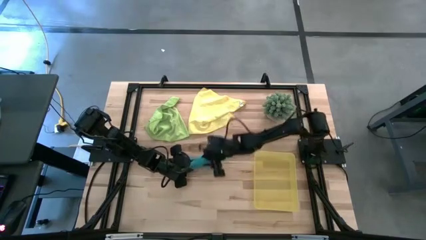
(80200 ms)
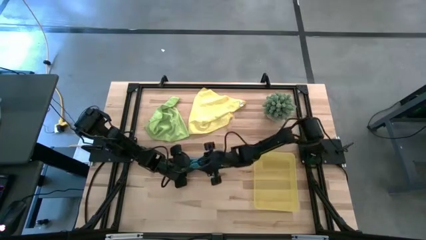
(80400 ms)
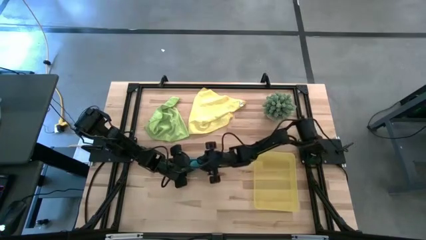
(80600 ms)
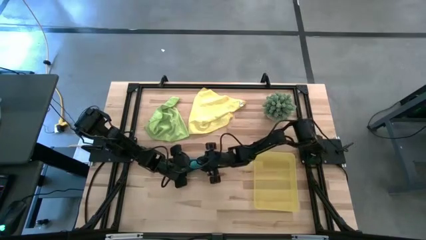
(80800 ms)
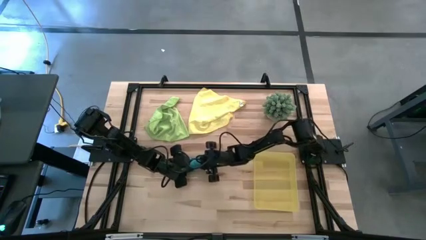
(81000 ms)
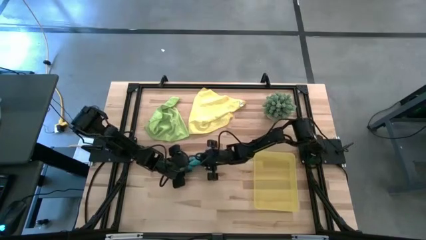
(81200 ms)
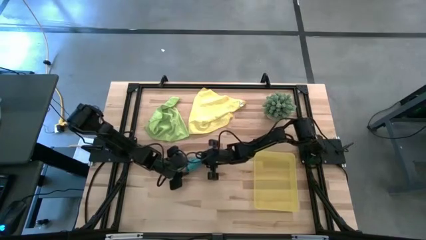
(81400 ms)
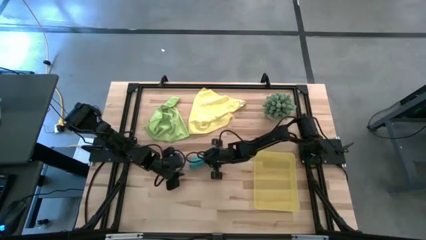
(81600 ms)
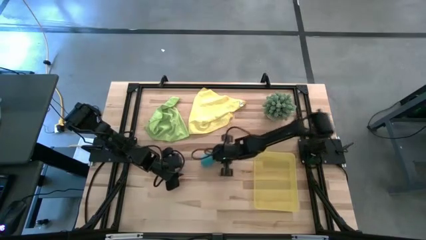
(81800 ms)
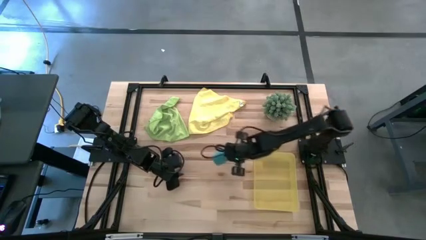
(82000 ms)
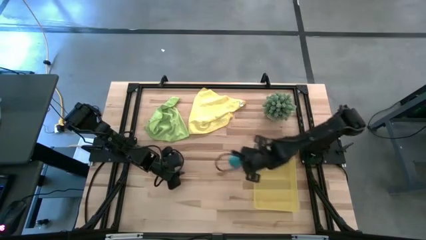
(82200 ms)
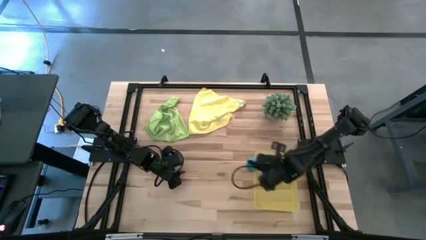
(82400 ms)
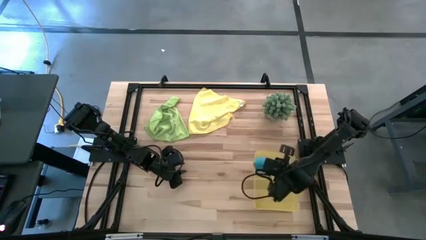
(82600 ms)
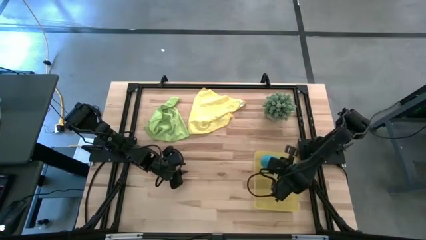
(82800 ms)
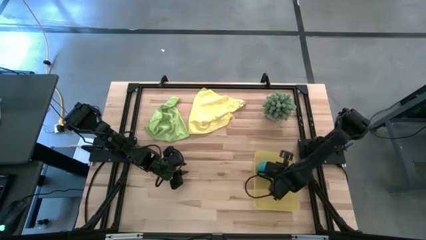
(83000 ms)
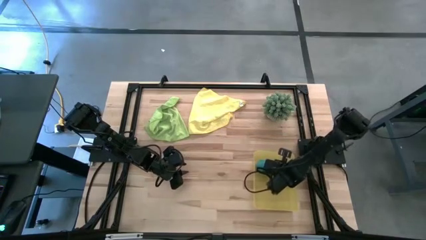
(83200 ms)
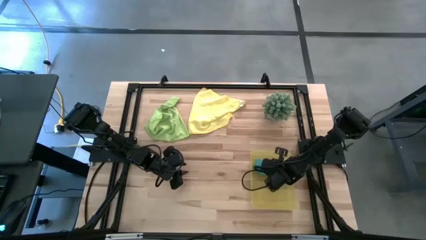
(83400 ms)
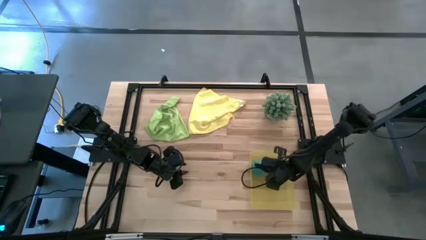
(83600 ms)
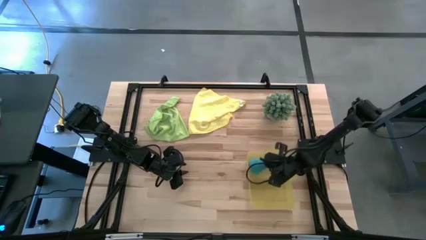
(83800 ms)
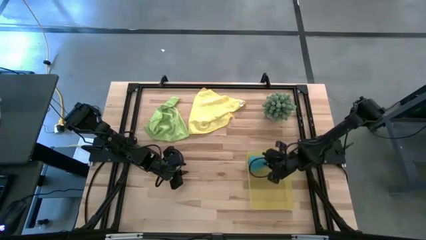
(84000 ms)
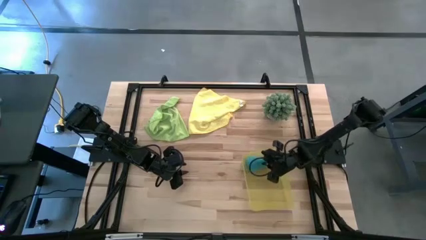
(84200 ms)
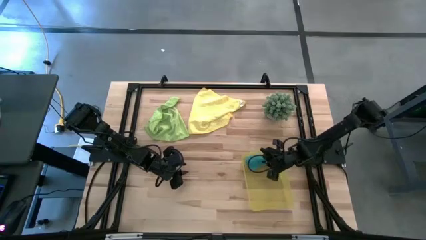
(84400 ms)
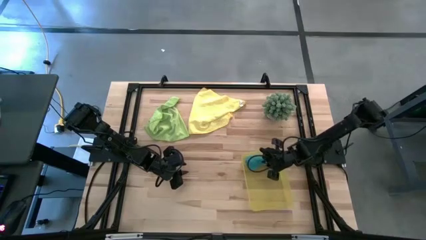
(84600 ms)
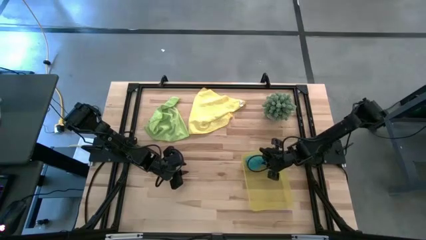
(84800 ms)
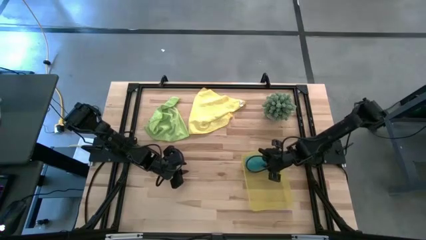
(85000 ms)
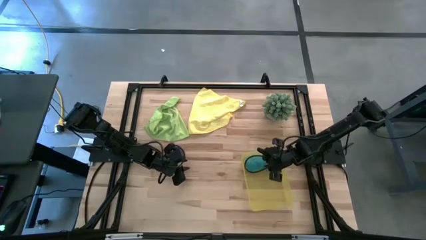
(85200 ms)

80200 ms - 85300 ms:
Task: Roll microfiber towels into tight, uniform cylinder then place into a basket
Put the blue microfiber cloth into the yellow bin

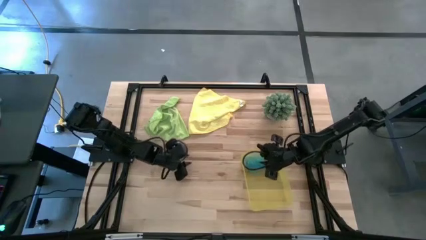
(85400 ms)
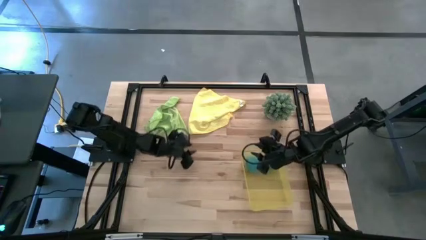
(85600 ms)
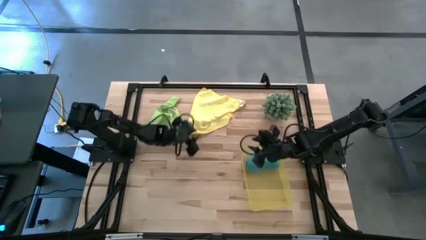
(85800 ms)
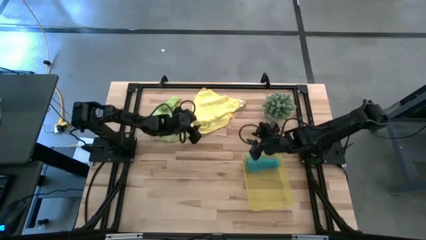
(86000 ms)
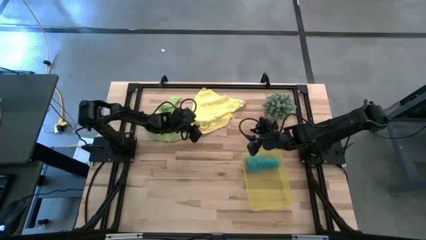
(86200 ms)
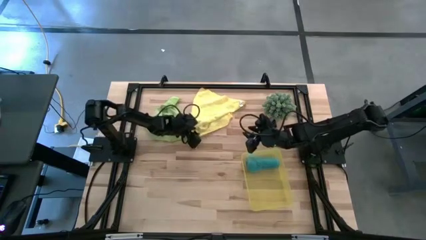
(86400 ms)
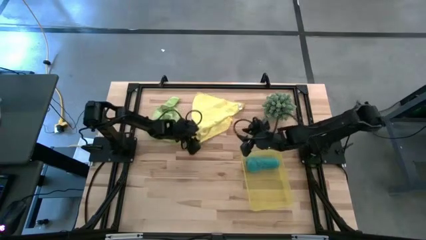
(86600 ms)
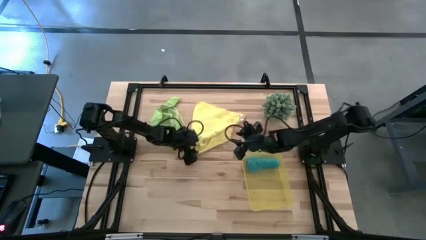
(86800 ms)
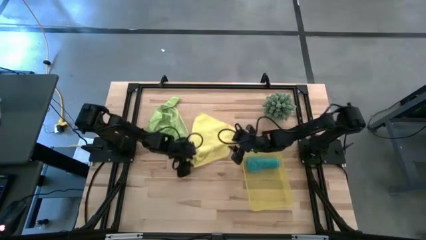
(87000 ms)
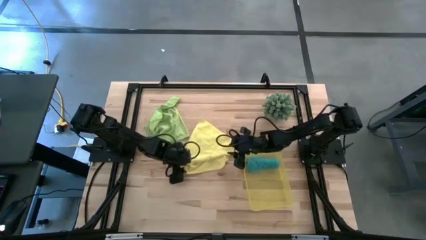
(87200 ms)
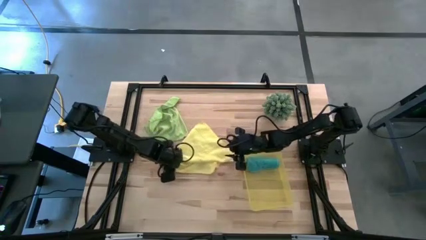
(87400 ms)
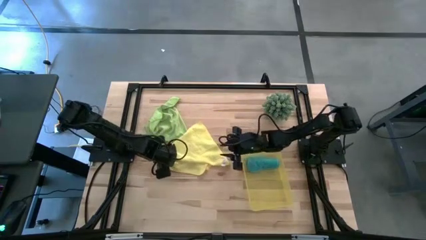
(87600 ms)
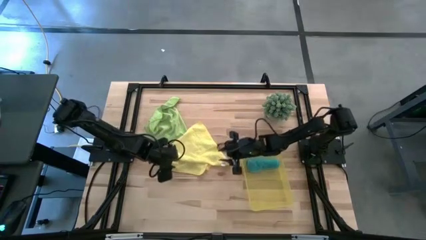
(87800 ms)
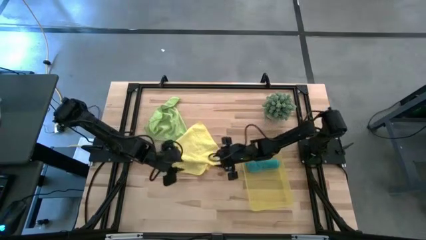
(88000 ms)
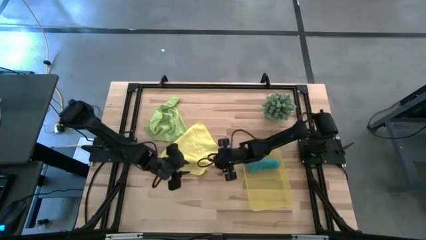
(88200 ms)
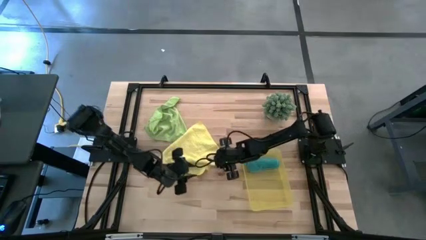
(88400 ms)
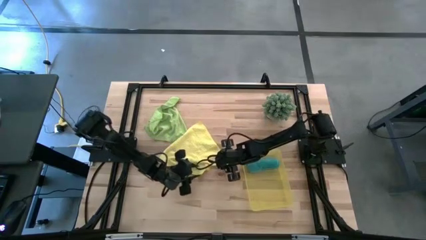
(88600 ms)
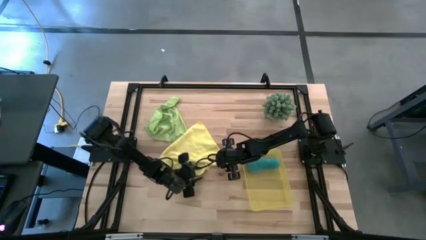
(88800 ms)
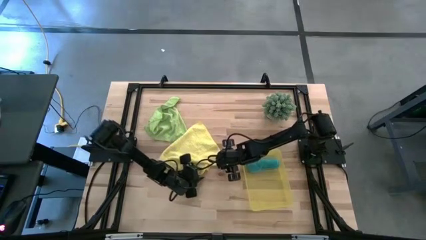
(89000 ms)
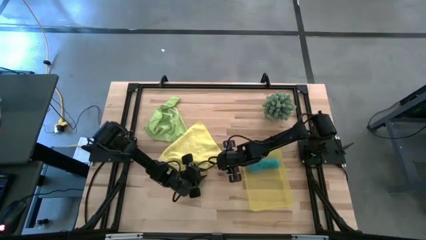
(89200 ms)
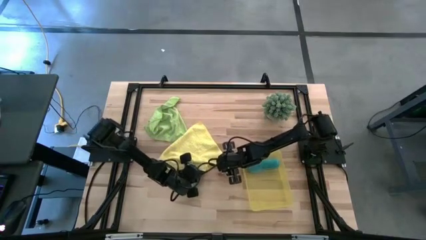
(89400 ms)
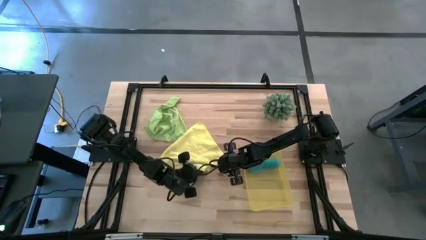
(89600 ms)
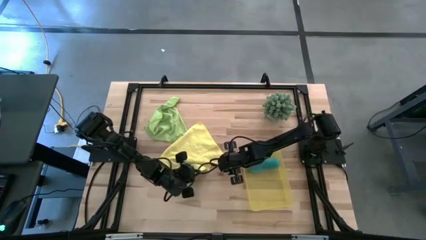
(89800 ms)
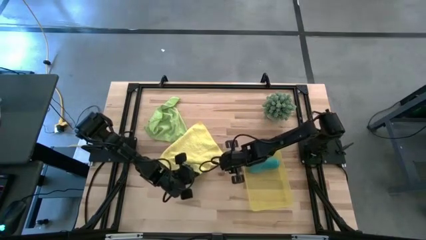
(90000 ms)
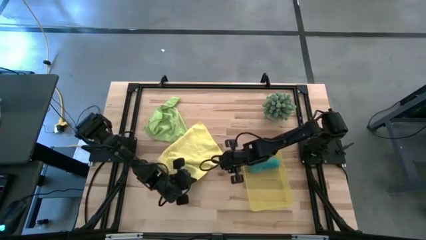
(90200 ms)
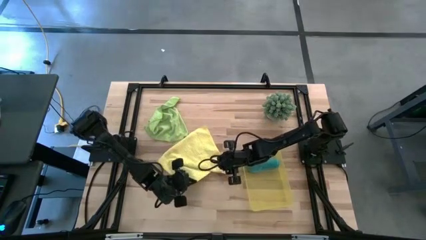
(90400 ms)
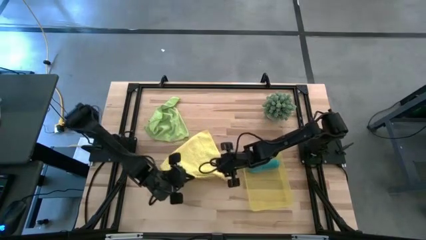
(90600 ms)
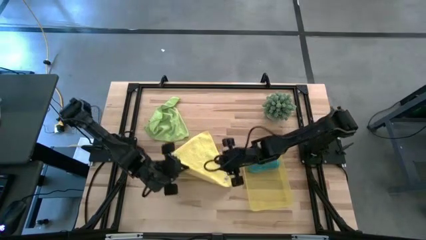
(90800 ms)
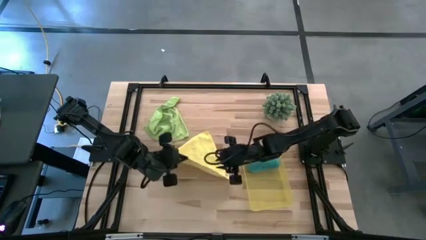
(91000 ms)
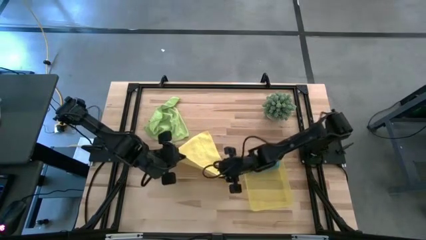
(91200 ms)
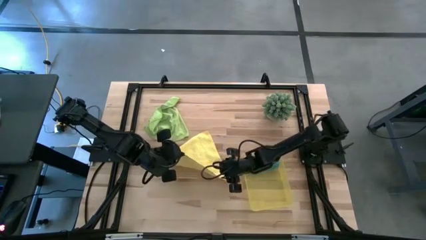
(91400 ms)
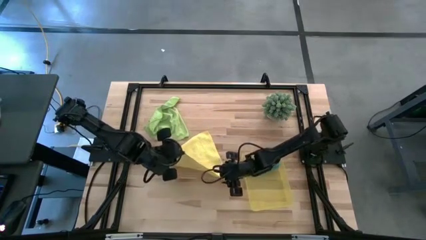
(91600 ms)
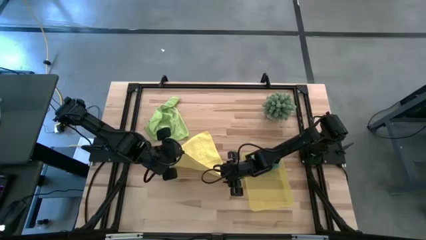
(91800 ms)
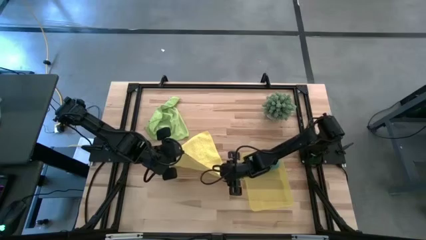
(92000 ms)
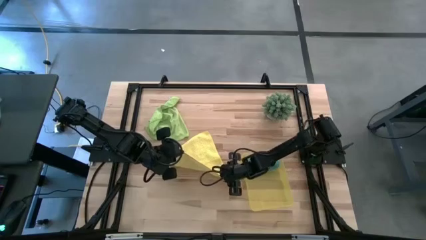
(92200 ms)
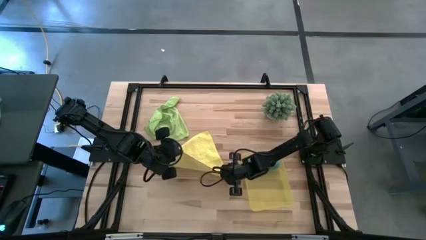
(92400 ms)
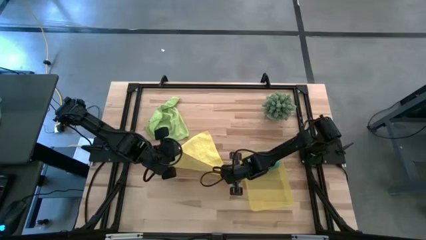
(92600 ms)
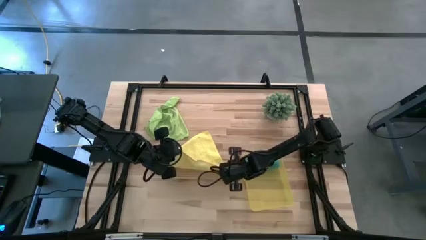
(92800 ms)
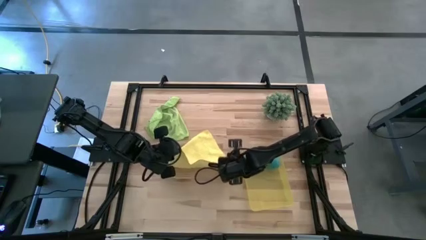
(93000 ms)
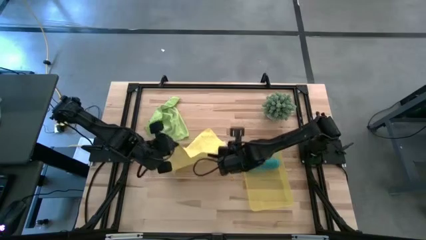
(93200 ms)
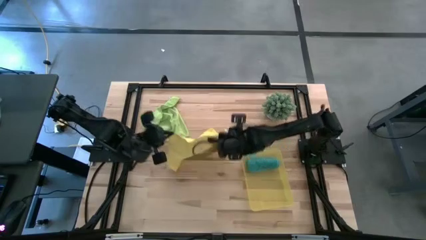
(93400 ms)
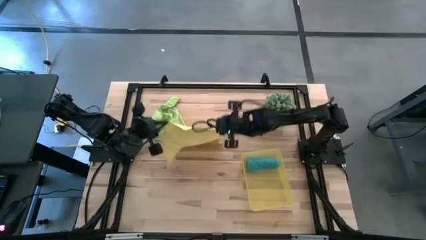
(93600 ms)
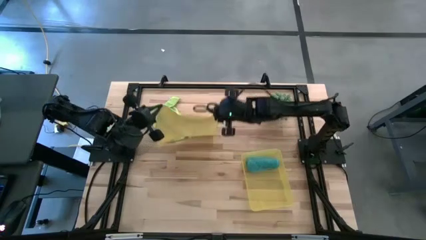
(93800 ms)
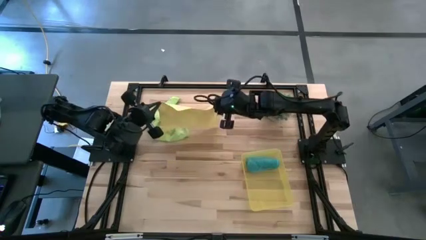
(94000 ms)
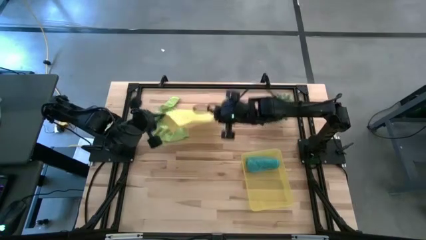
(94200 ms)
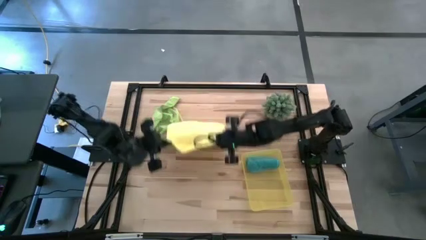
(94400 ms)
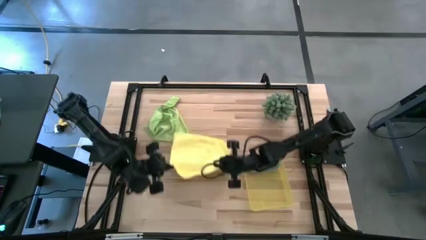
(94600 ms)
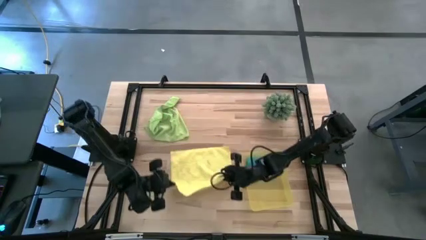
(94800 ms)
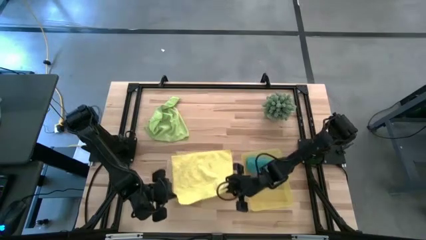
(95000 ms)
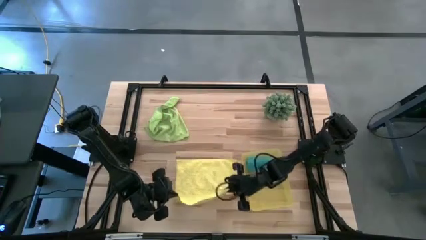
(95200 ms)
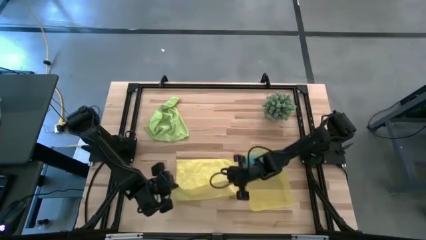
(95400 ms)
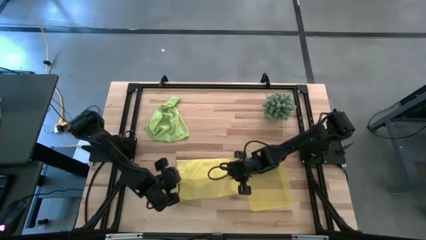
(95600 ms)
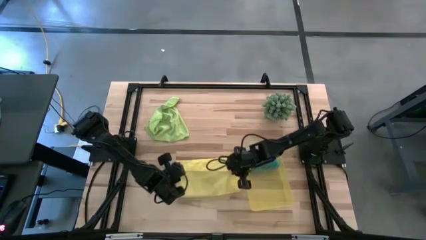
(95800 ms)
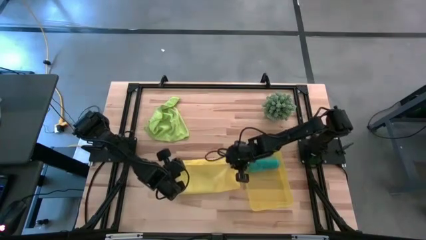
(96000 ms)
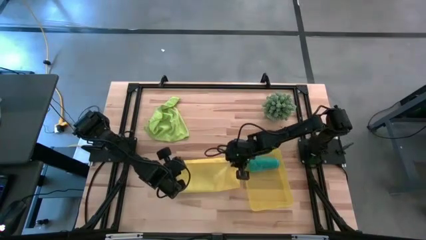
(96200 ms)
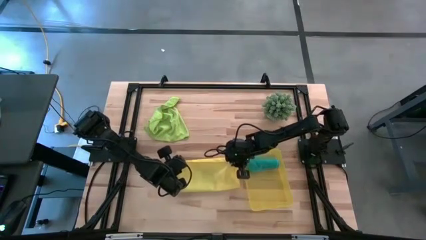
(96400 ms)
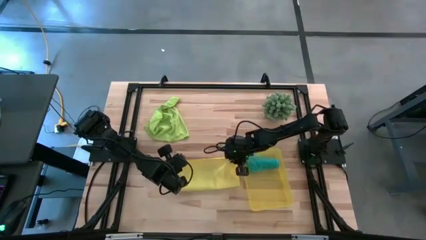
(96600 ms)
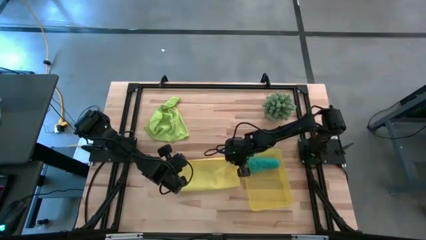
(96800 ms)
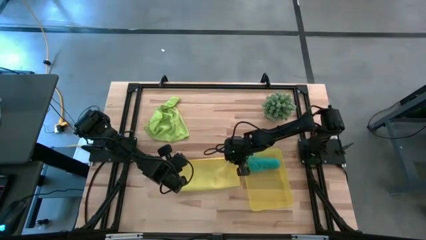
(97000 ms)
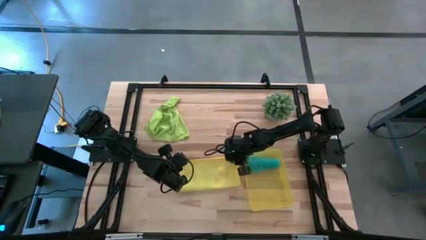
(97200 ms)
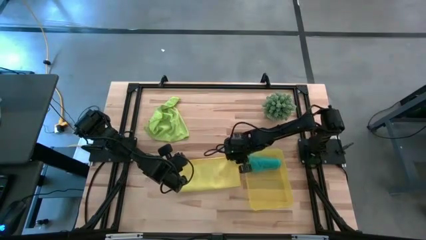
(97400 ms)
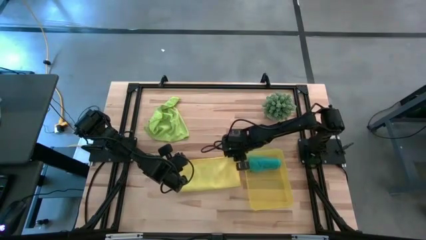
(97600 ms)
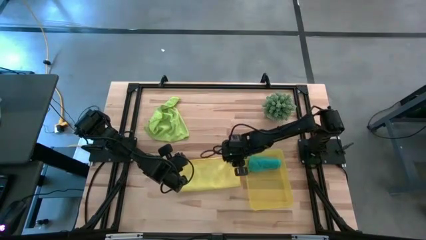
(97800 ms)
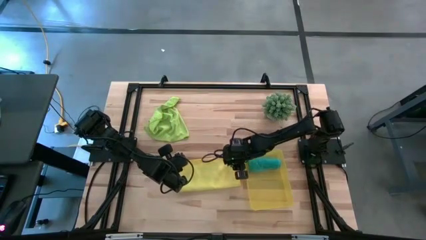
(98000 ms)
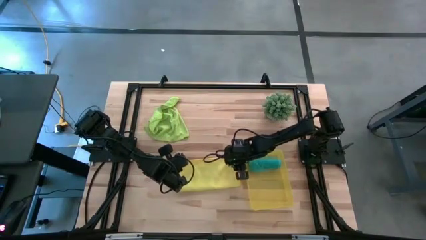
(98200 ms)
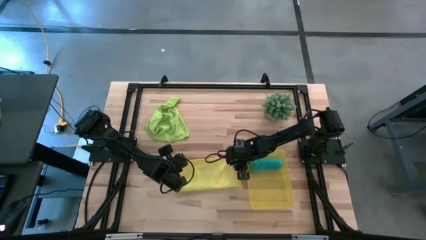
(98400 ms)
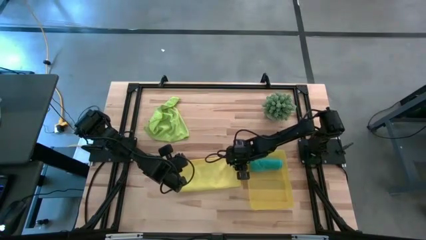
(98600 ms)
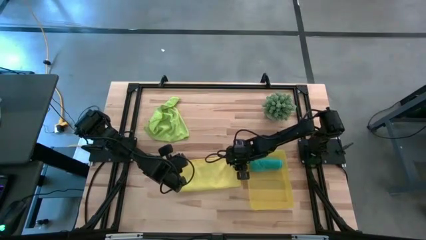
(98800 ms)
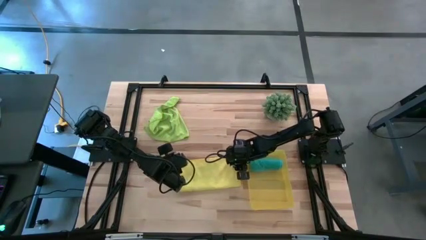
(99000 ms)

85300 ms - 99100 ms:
Fold the yellow microfiber cloth
